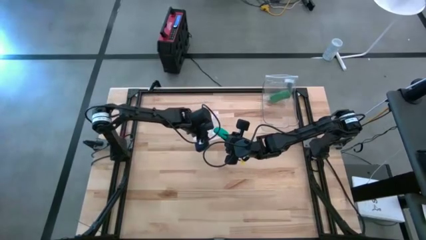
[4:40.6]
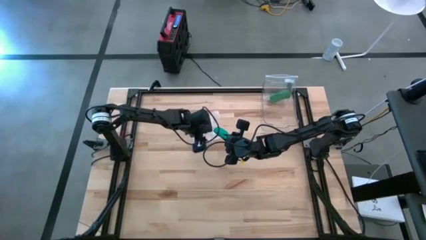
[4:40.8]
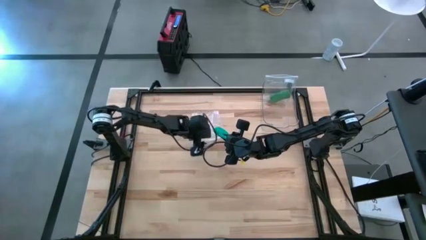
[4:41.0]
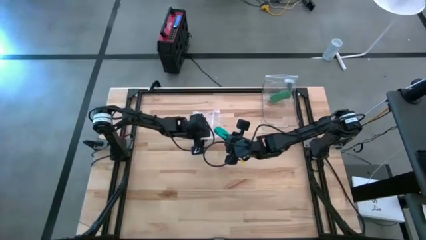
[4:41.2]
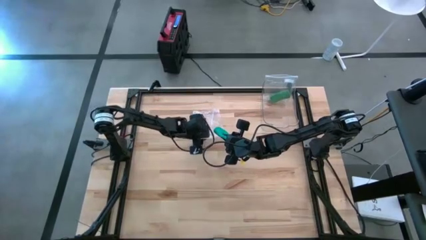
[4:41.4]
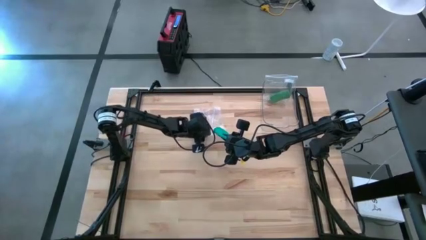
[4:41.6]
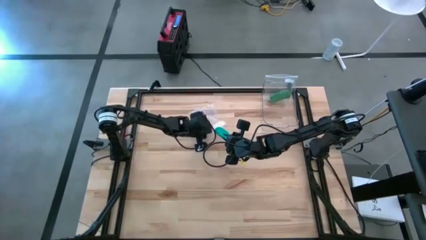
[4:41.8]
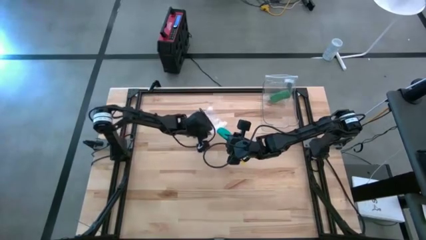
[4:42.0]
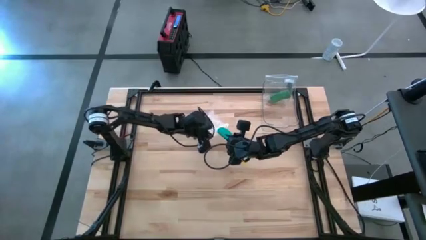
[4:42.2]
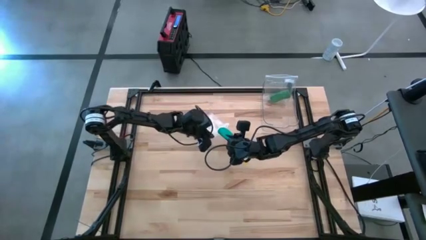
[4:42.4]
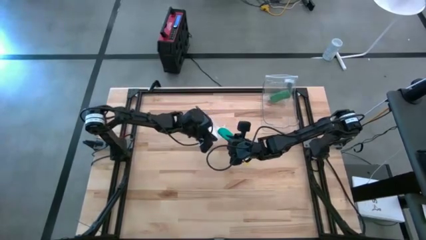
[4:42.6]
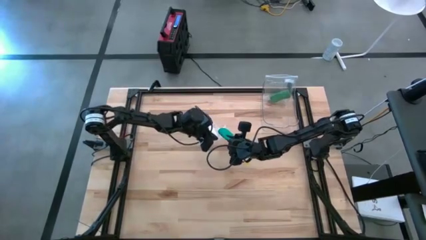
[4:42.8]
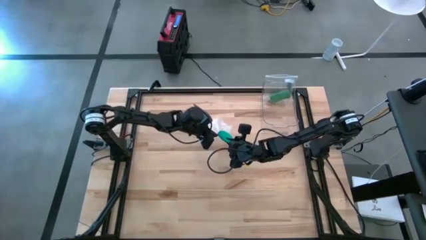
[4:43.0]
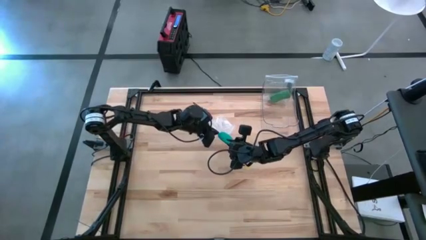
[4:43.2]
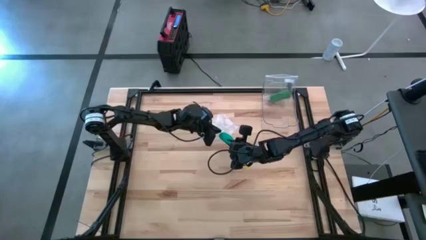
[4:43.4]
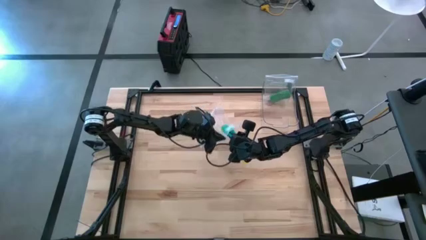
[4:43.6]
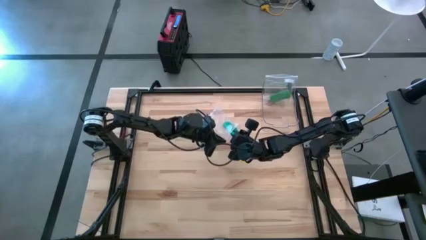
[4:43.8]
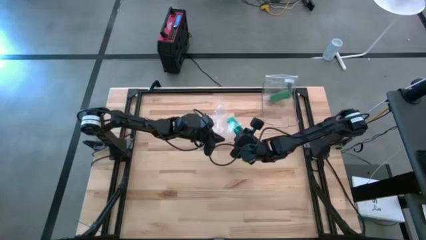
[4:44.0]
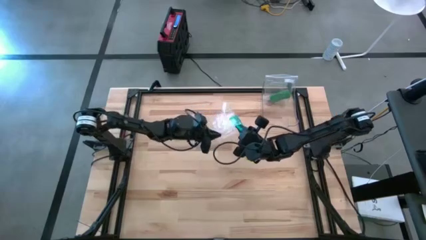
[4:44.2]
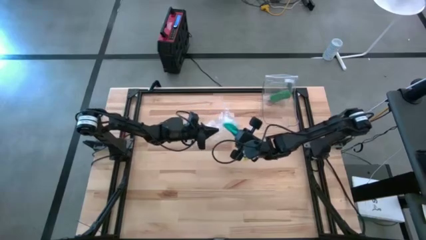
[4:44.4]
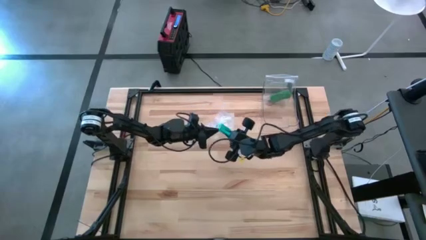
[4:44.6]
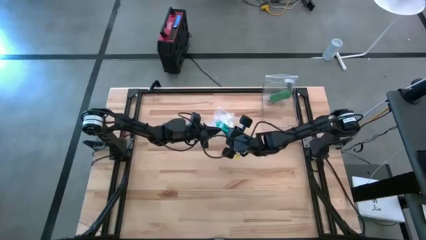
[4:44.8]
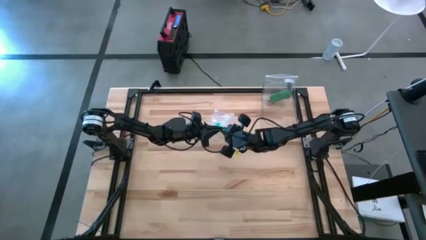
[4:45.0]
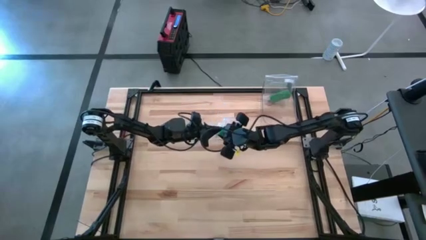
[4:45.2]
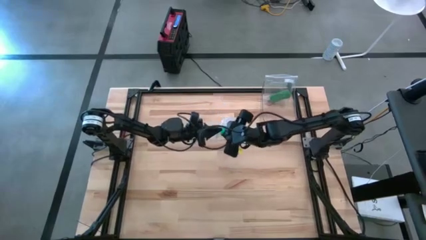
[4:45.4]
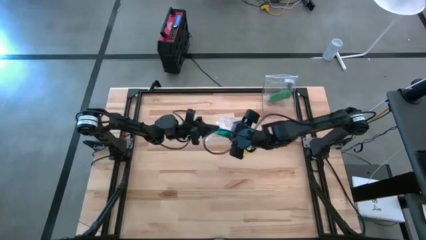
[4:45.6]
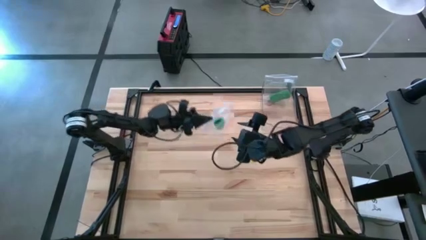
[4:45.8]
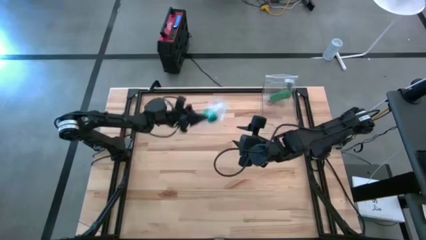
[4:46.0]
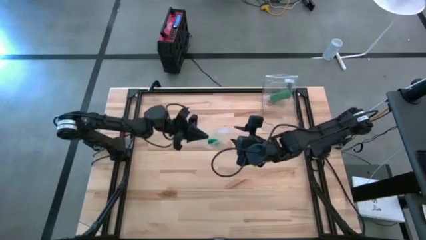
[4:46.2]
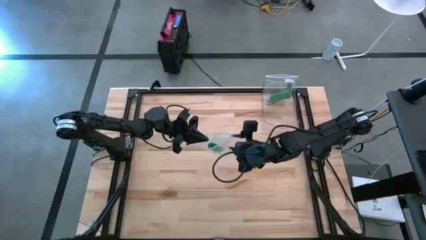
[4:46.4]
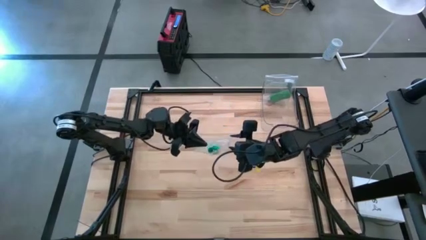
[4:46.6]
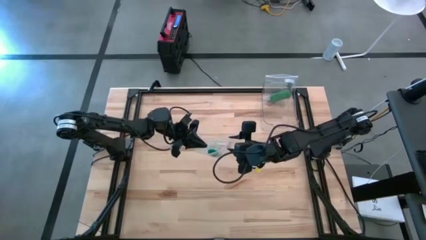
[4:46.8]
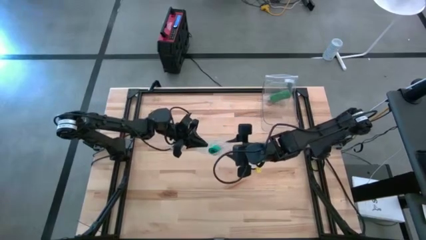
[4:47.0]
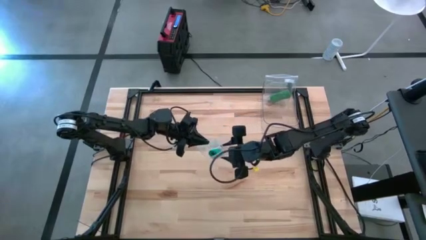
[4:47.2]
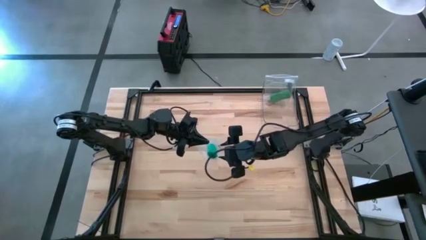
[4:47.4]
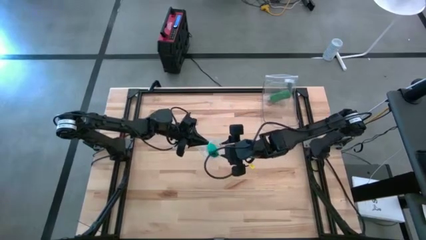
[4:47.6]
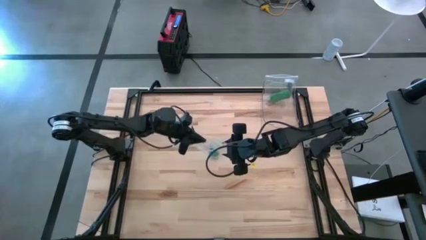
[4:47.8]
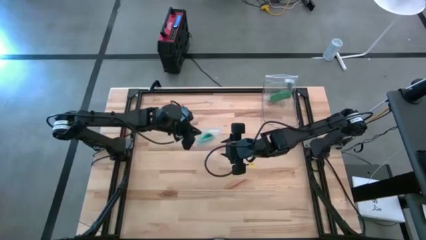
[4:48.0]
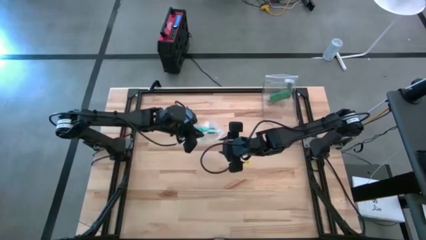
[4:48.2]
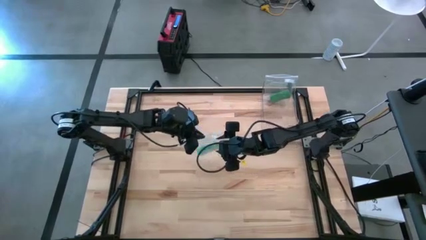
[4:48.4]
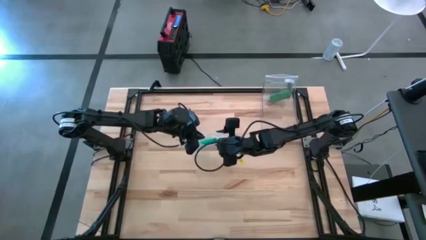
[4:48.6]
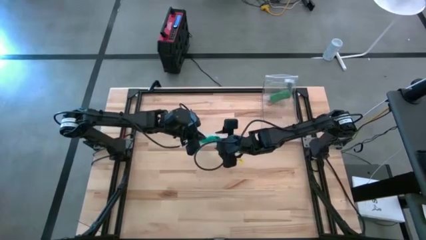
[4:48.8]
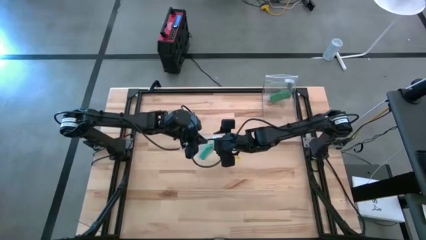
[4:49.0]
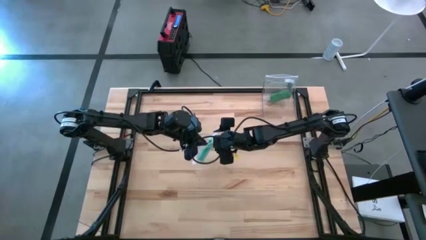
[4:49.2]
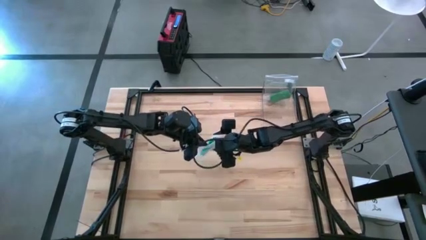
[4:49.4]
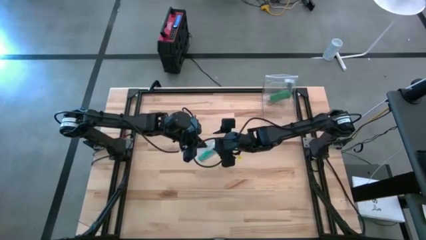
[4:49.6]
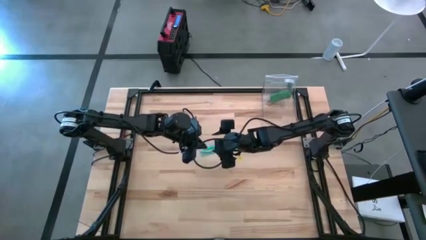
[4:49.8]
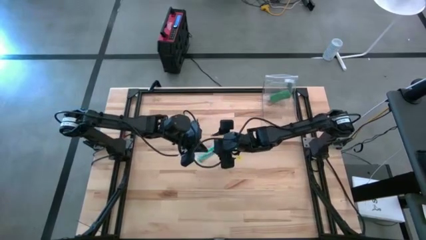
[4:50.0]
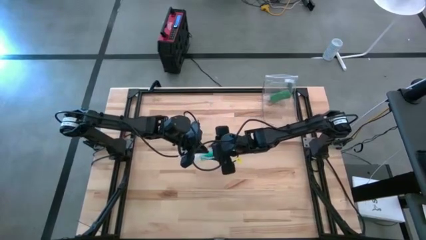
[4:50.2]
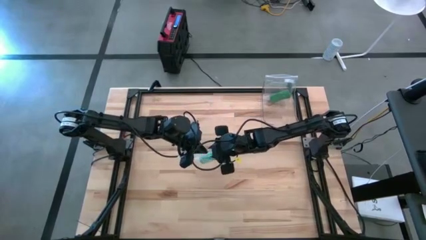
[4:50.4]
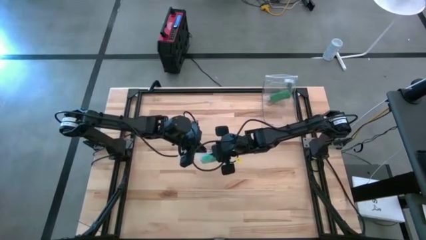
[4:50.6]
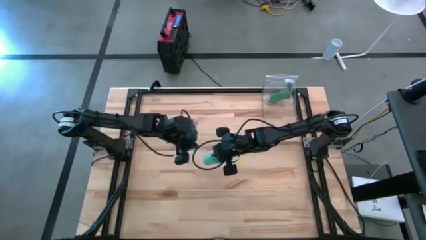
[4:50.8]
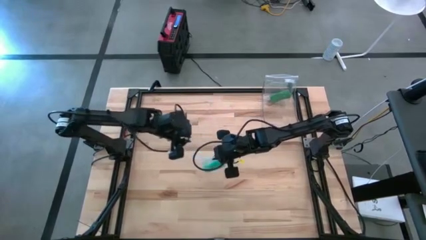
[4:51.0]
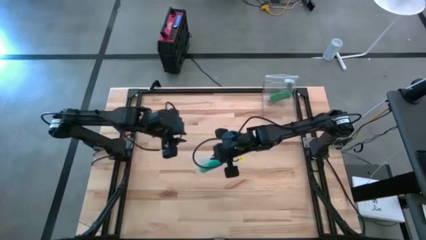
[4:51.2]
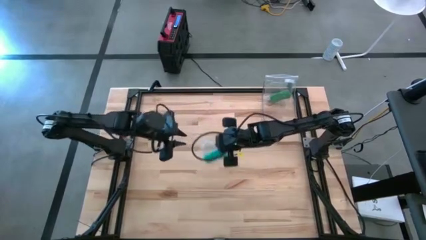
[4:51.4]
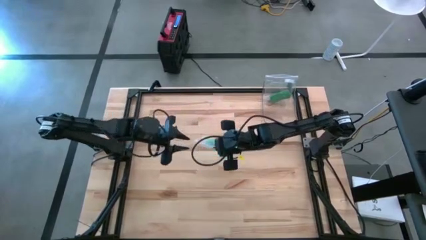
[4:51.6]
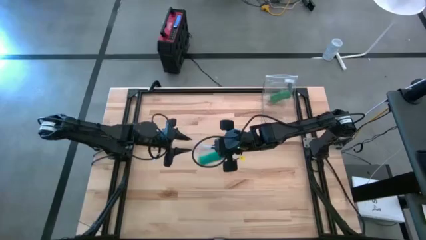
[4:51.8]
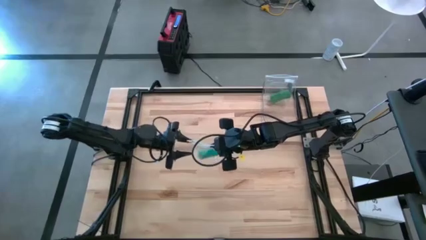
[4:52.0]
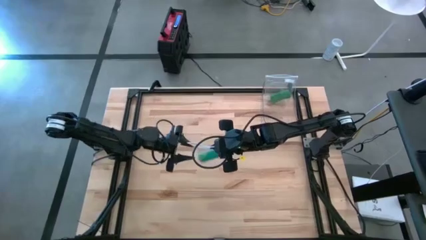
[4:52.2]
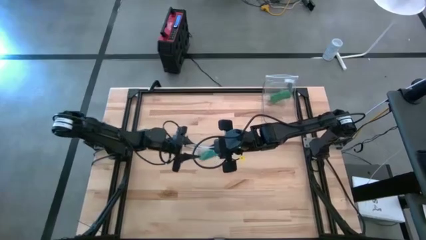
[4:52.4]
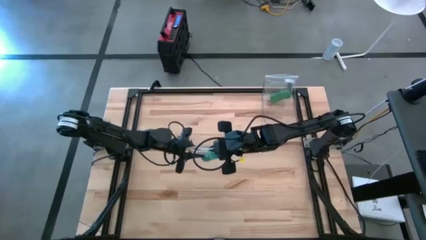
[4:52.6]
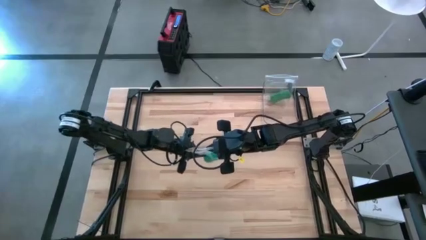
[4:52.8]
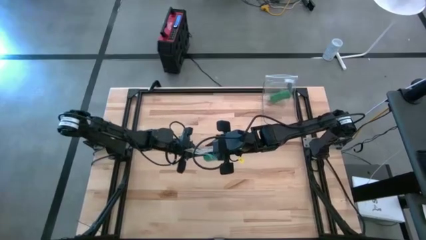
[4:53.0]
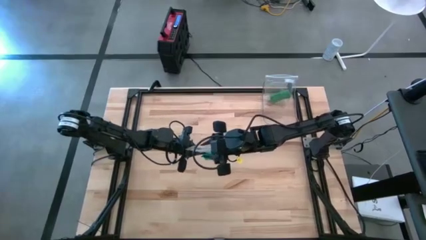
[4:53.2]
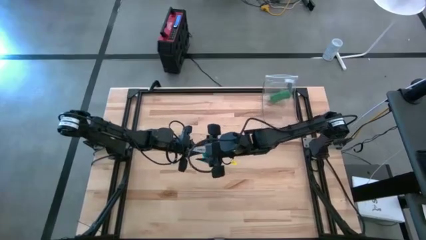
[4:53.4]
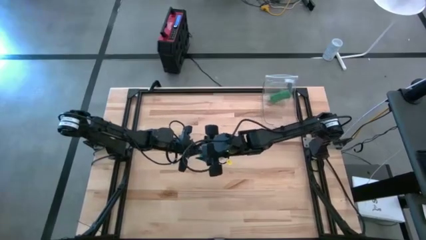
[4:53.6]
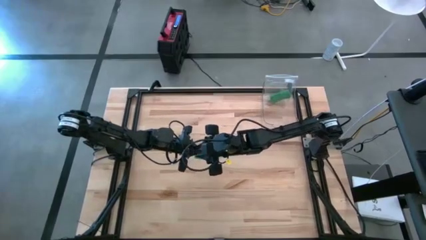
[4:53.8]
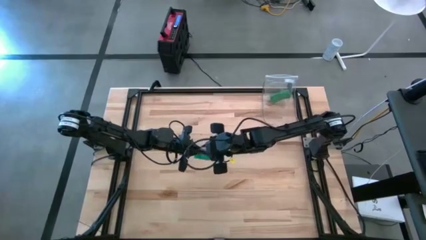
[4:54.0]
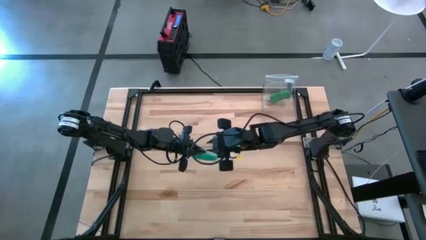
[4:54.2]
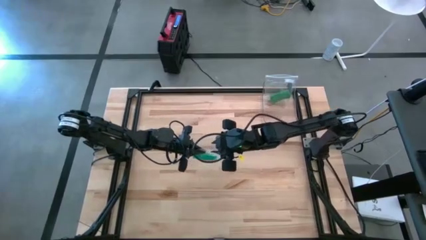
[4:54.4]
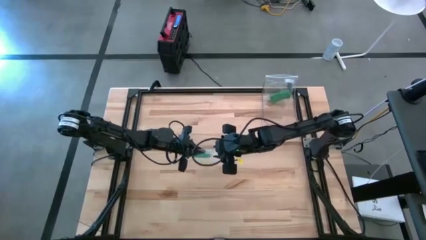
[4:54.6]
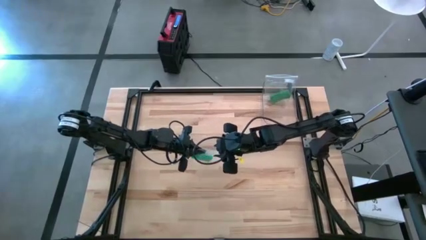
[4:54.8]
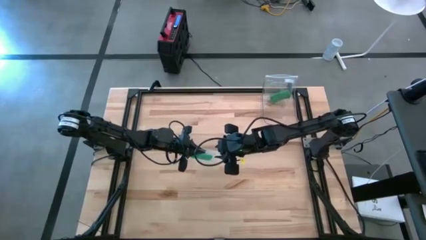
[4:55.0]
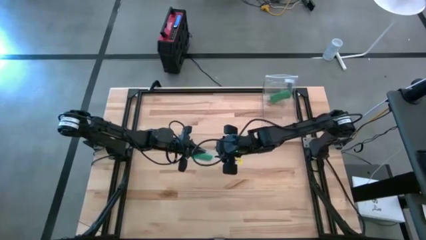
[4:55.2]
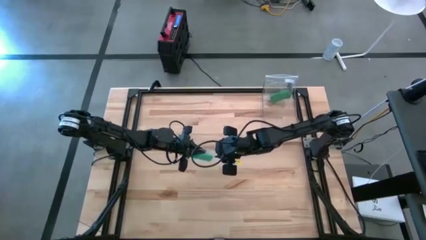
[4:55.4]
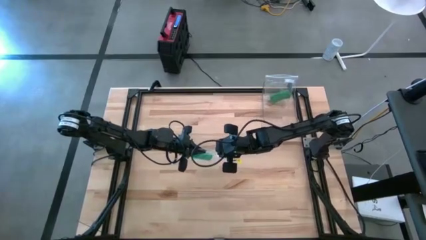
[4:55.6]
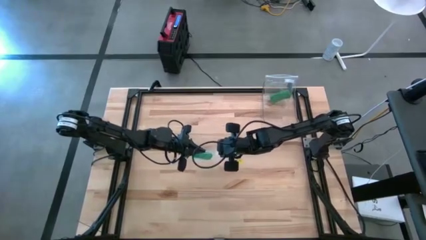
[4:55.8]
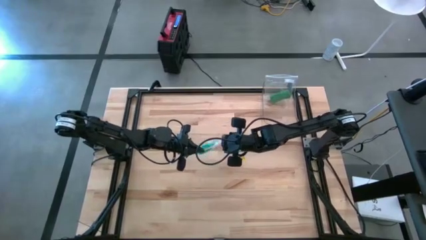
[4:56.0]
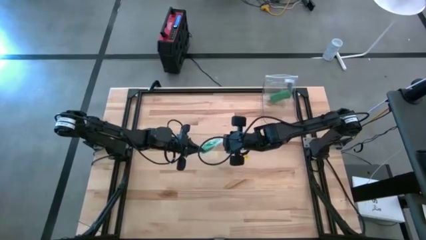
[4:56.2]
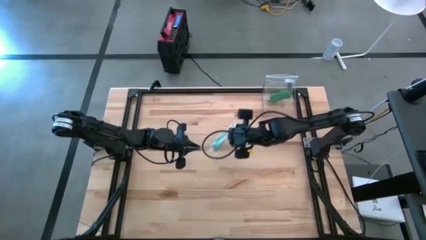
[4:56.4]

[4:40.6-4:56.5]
Task: Roll bandage
Put the rolled dark green bandage into the transparent zip bag
